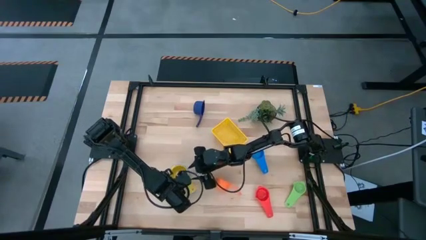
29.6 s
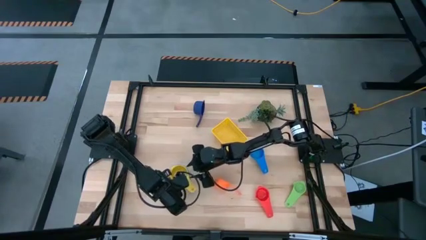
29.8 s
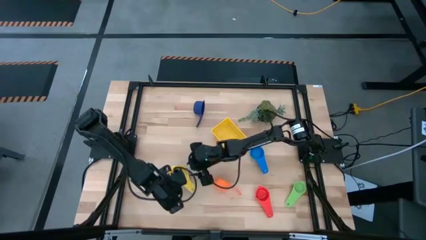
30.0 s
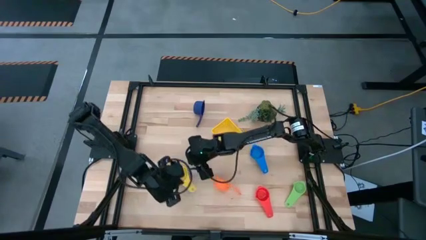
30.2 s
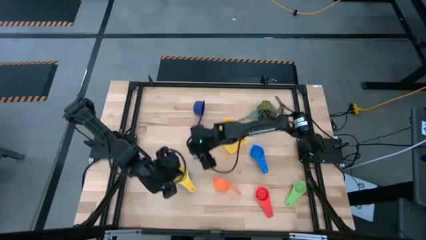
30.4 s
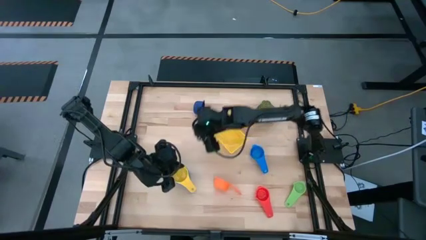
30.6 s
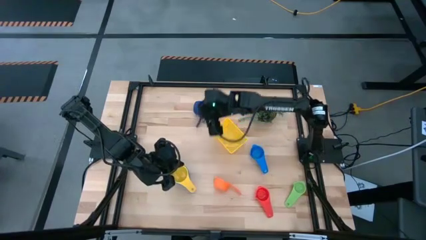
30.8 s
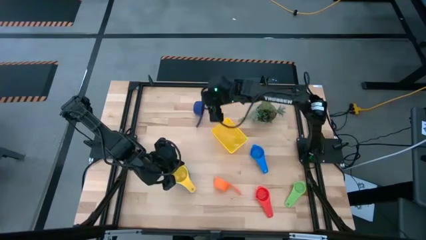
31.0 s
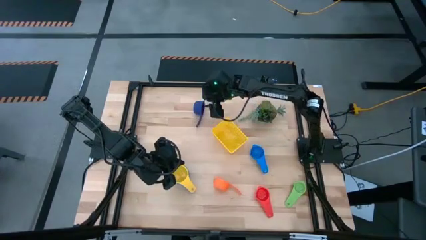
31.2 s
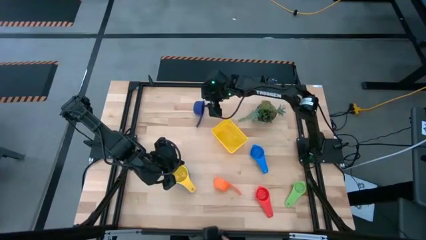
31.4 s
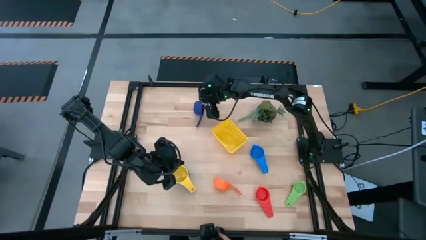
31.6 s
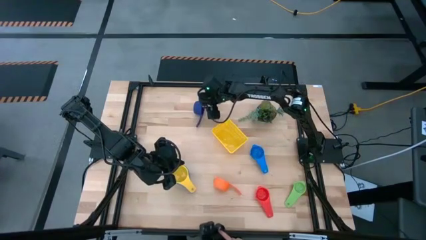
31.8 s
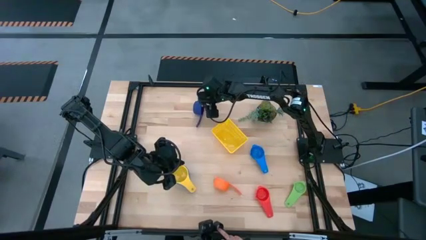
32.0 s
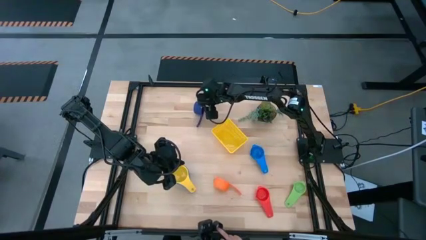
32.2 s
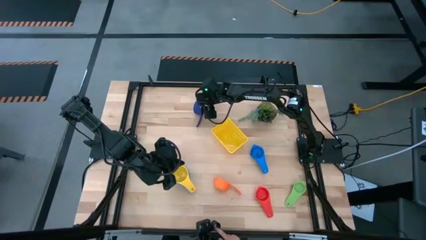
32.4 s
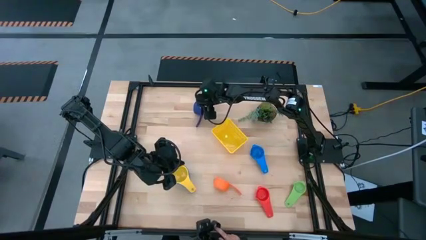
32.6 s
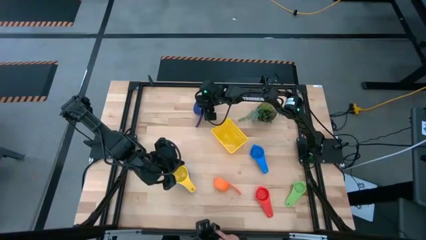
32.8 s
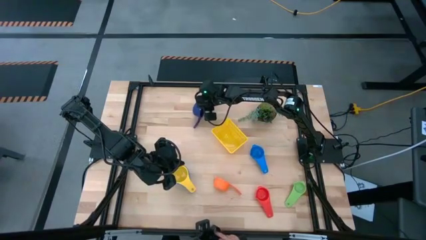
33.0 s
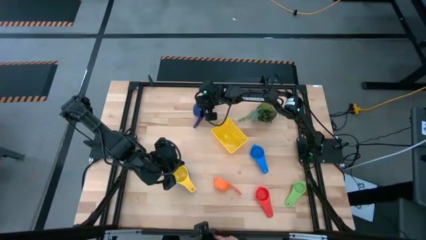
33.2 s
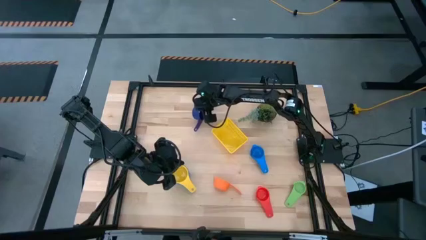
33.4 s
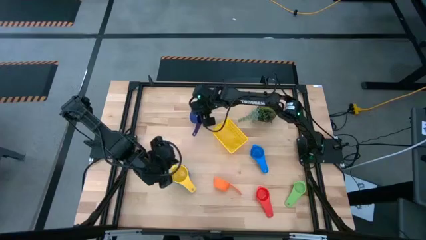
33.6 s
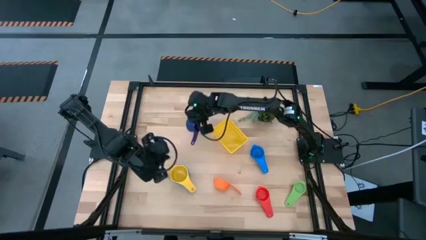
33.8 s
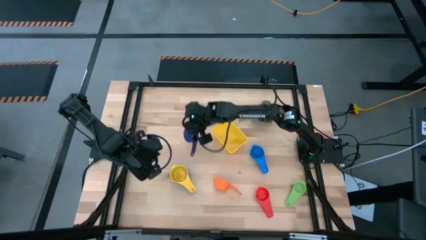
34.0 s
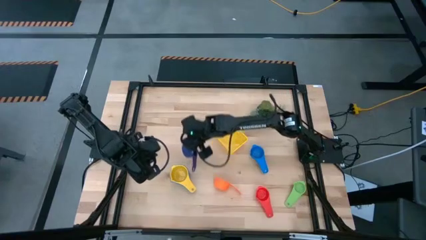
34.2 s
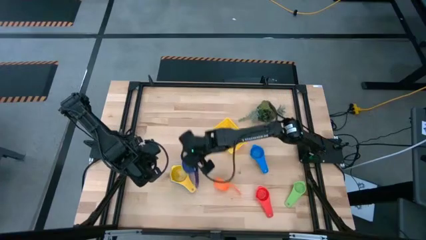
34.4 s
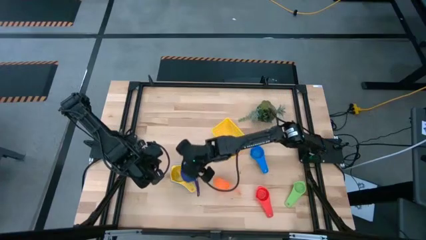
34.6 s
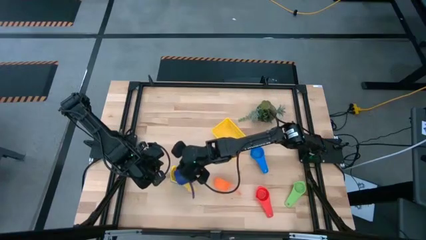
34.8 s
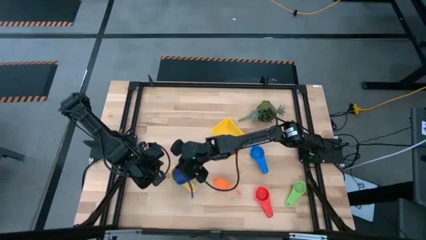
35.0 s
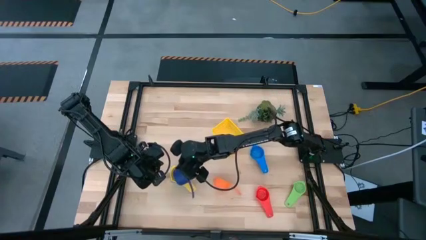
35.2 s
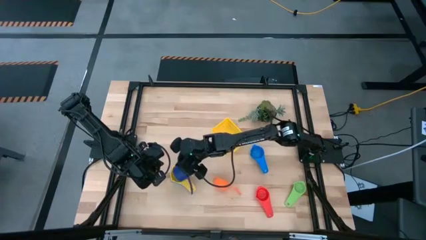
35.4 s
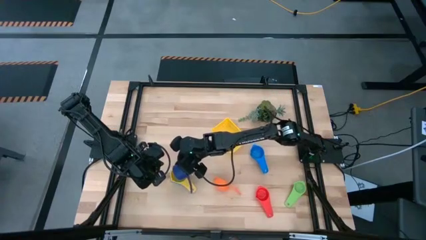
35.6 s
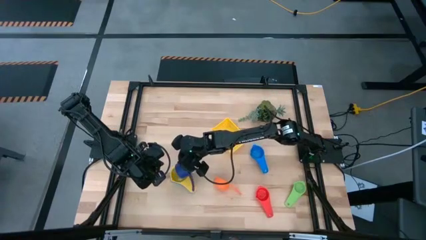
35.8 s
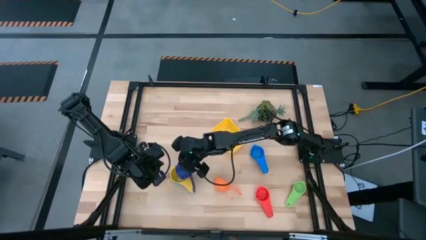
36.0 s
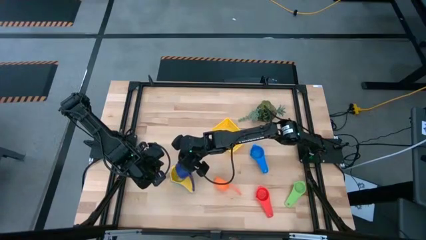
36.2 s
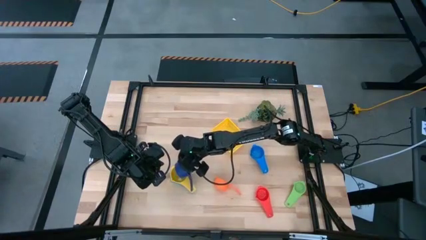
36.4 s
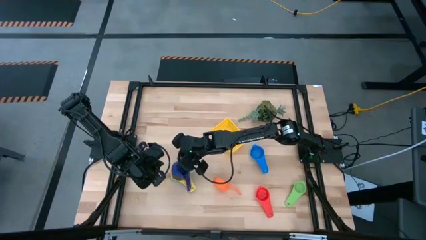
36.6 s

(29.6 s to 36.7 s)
Task: Nest measuring cups in basket
Stack the dark blue measuring cup on top of the yellow measuring cup

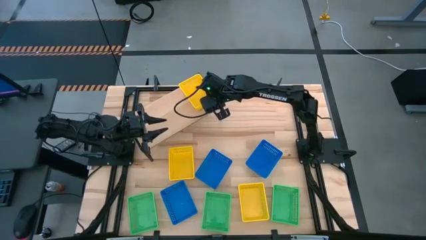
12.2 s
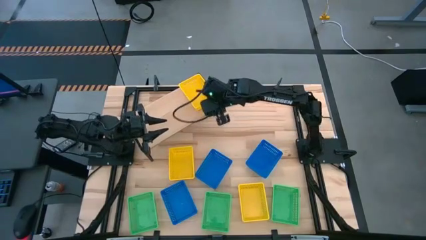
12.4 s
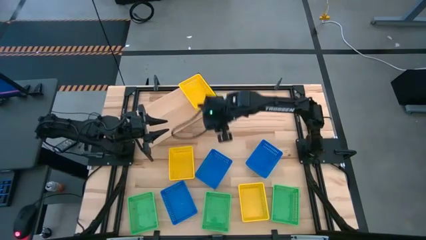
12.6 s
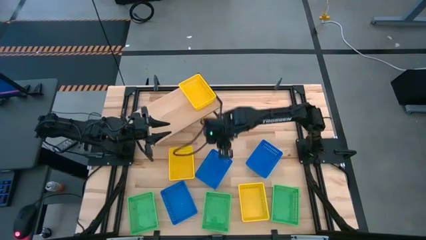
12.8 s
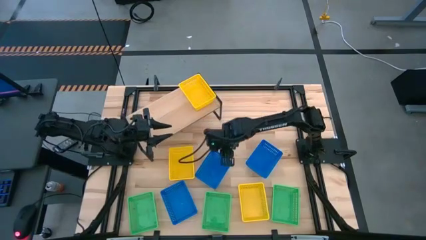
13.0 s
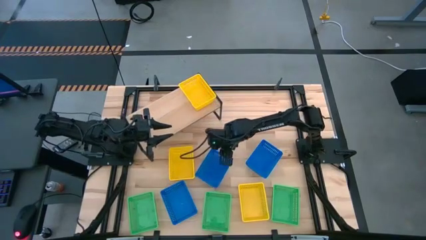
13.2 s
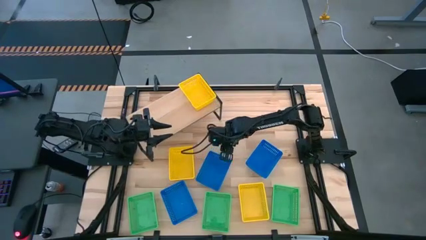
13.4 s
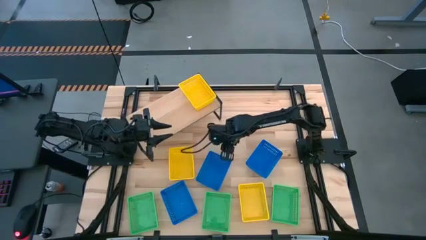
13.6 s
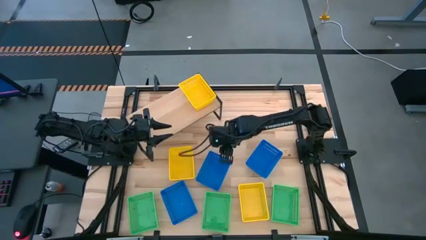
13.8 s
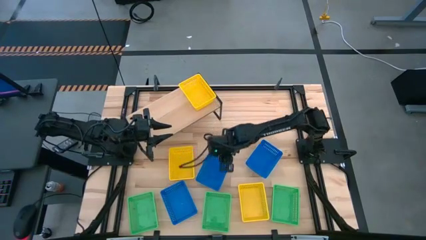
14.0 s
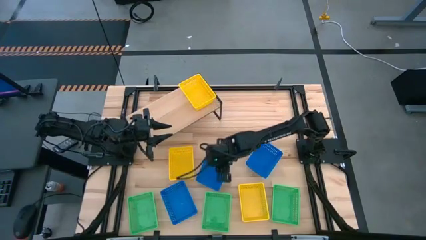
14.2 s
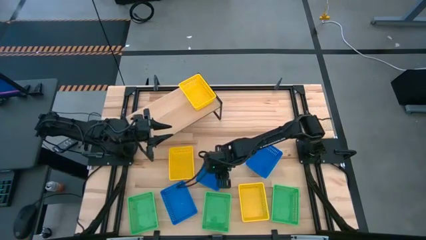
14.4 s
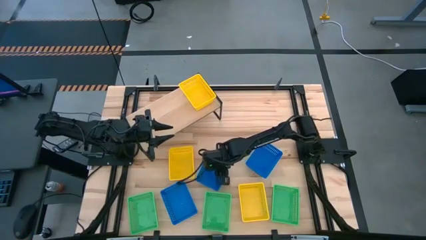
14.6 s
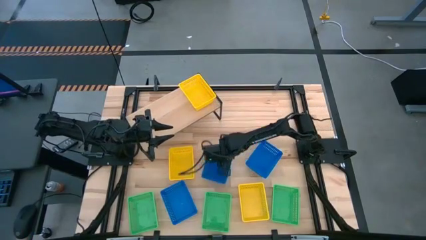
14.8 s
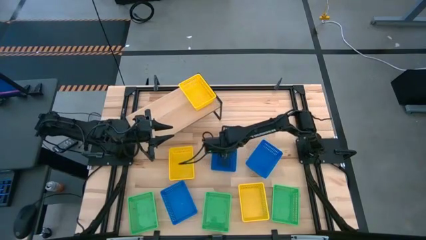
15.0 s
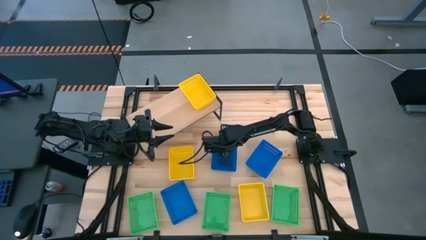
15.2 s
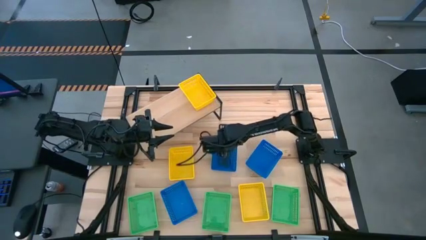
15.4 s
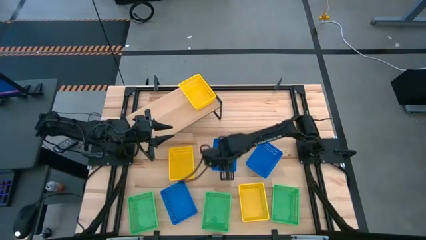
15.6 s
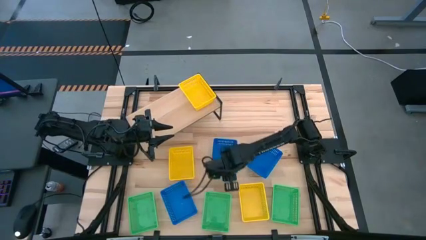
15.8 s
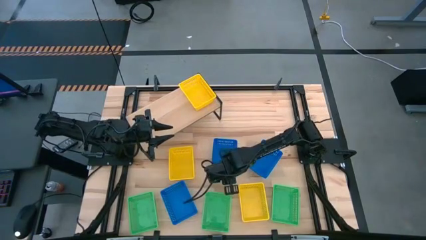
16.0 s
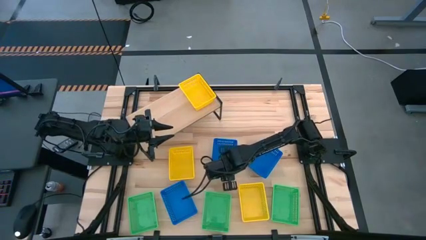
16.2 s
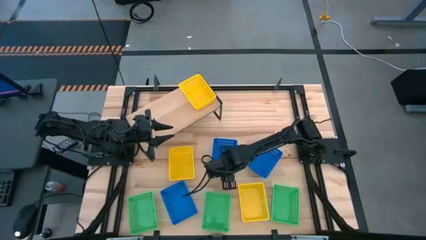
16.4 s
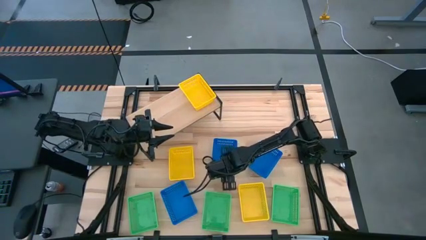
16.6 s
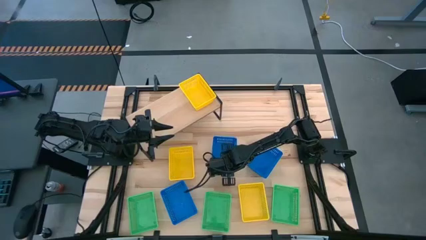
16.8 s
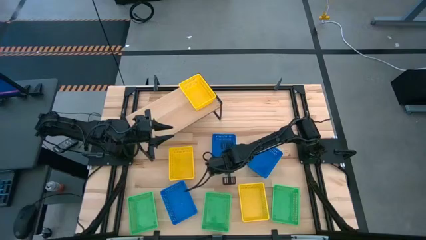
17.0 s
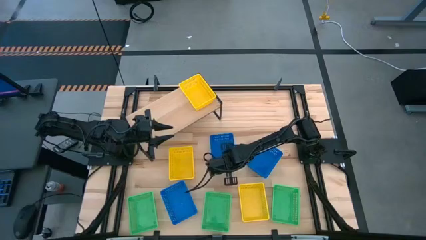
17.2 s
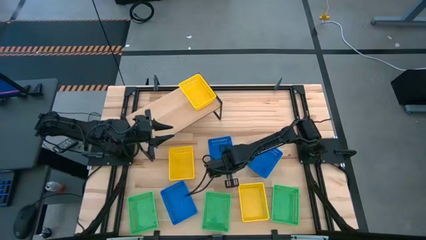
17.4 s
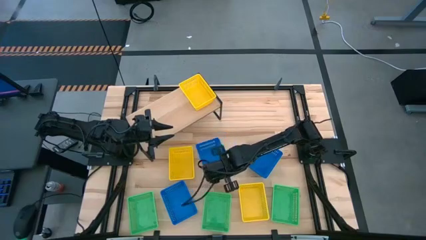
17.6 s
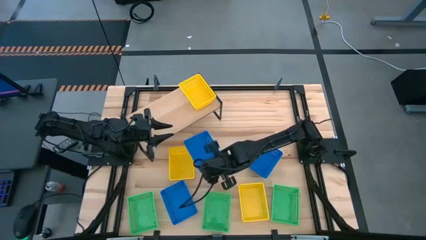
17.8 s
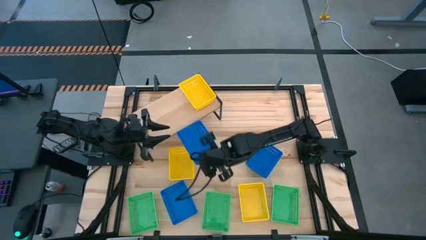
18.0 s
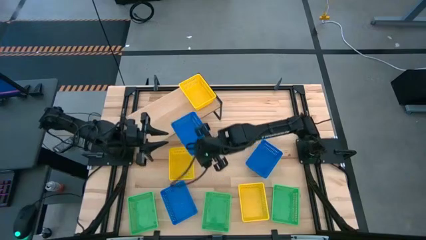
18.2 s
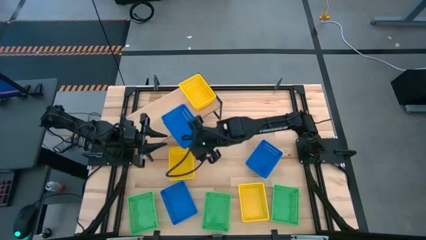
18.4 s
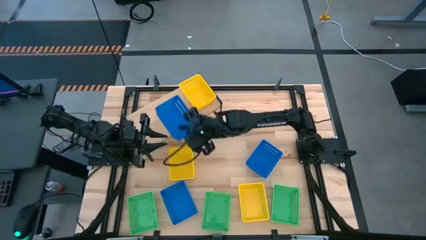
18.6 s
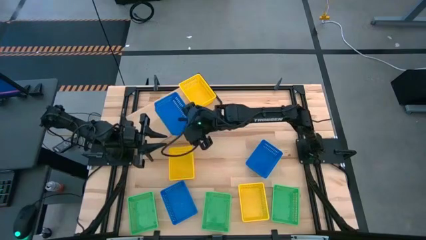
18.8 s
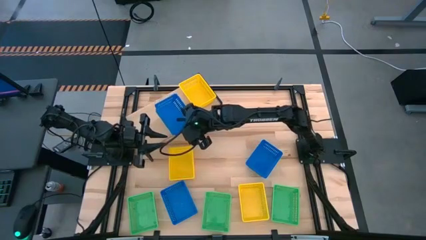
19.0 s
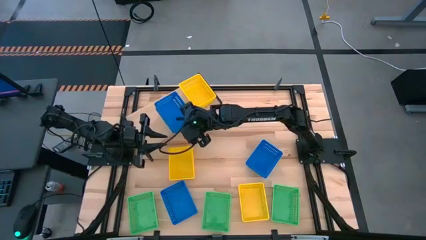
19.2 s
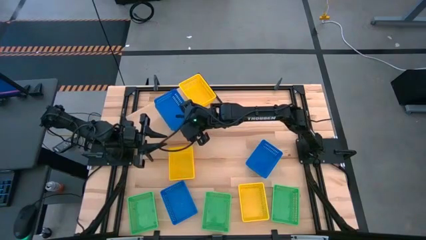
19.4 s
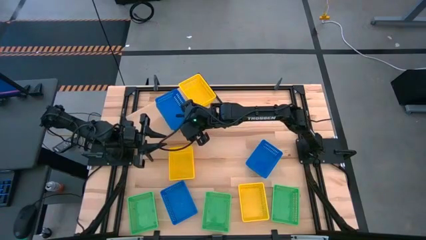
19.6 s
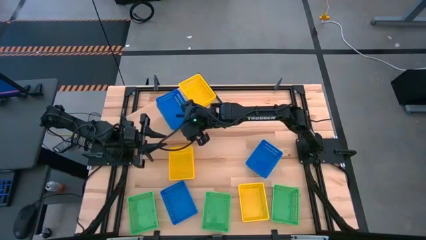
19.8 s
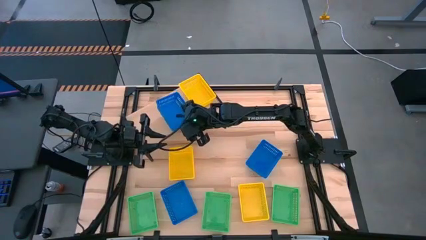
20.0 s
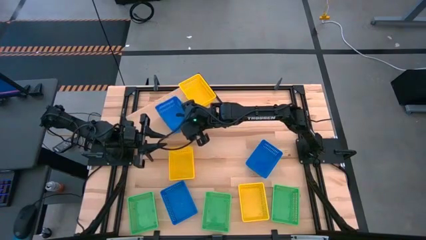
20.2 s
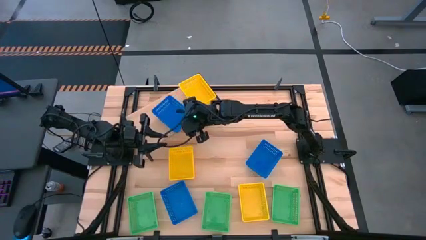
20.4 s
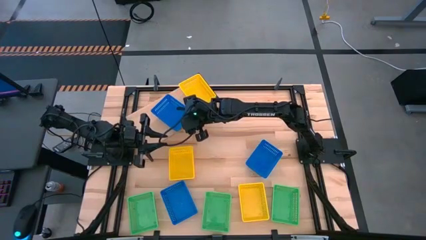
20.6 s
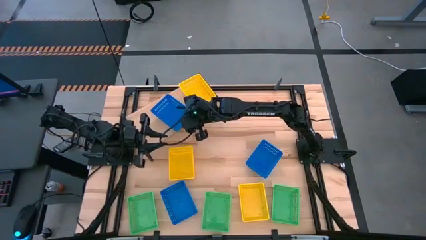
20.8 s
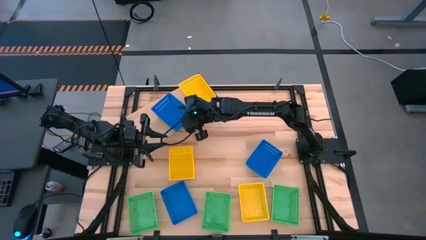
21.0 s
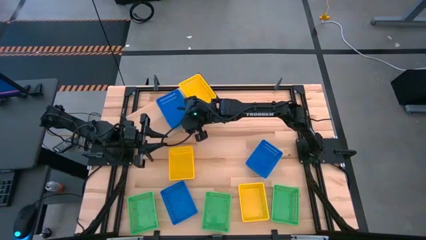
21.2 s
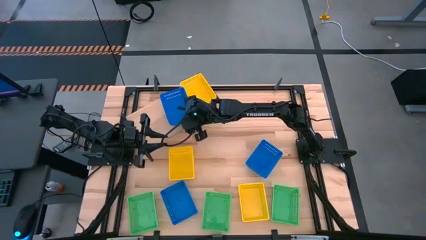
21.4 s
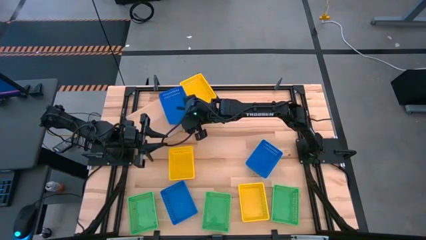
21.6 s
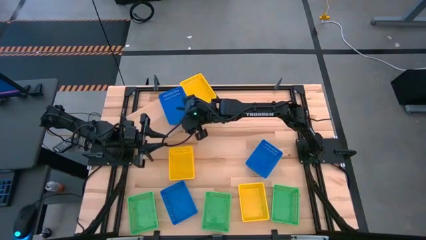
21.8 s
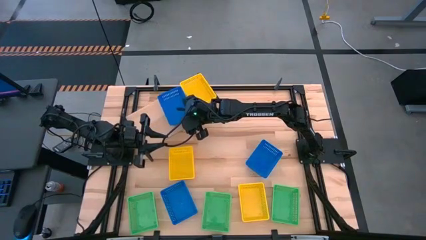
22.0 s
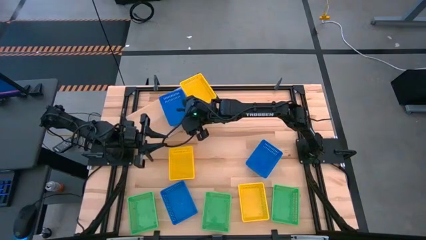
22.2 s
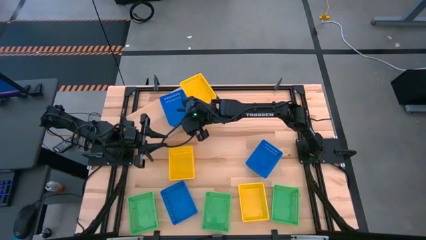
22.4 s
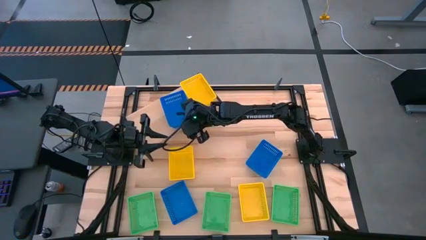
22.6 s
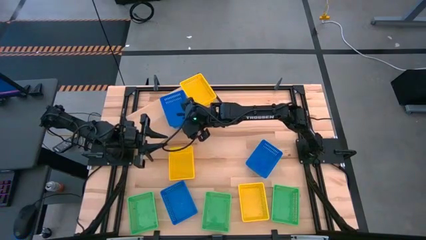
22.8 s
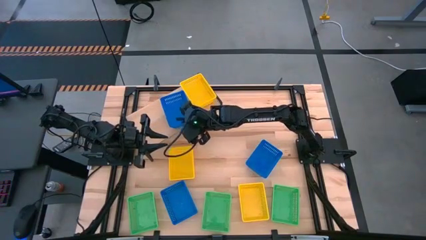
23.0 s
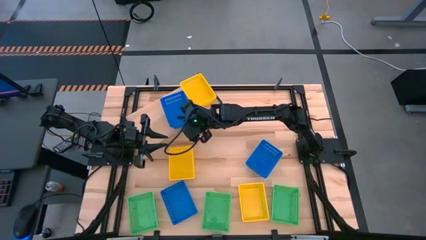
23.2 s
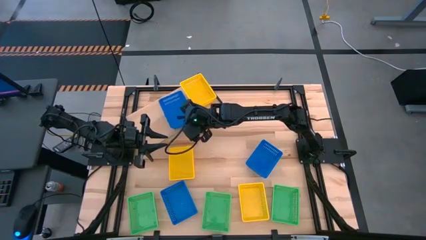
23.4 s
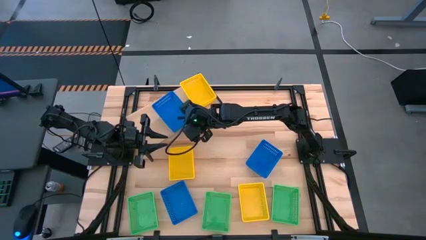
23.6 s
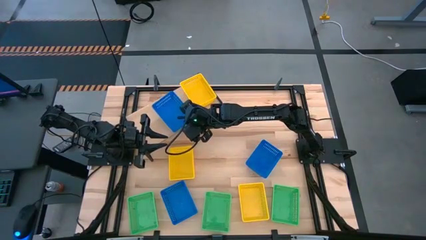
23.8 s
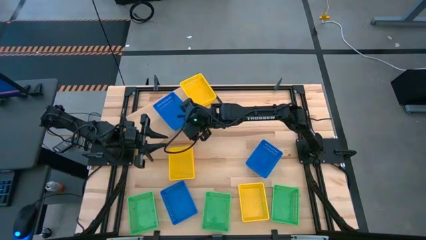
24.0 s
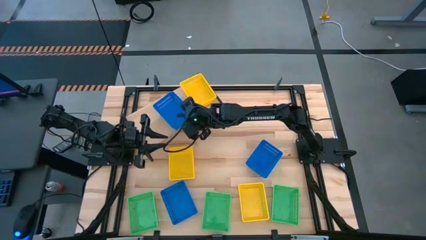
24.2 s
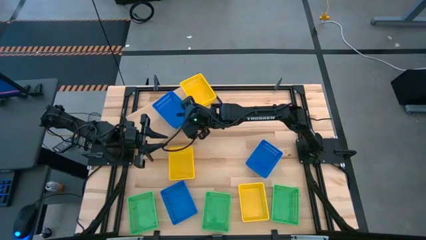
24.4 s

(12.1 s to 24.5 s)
Task: Stack baskets on shelf by color
Put the center blue basket on the shelf
